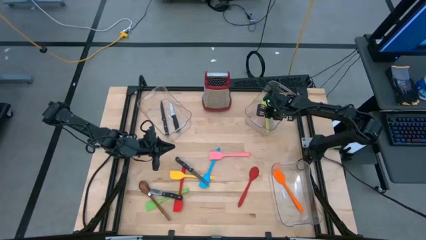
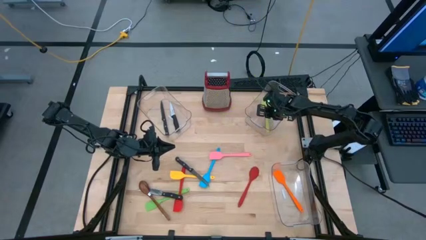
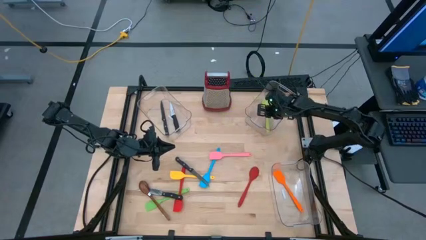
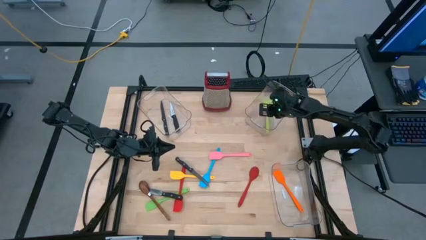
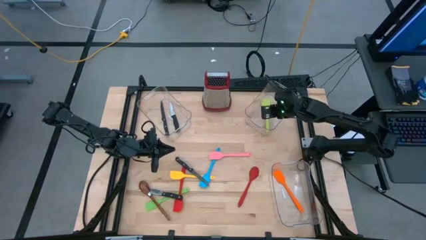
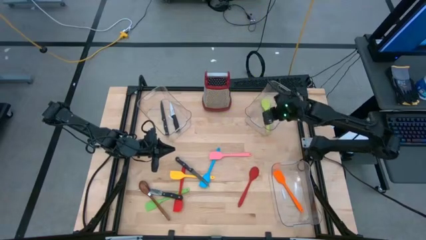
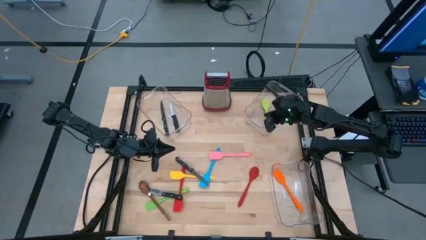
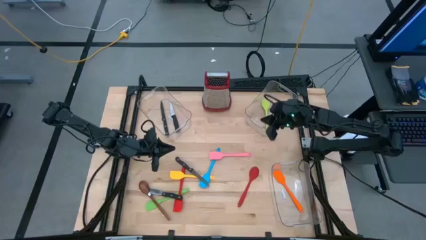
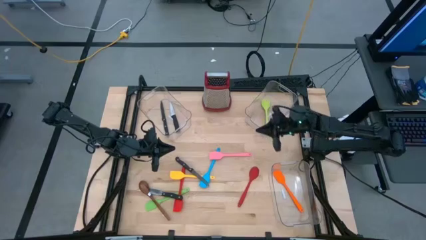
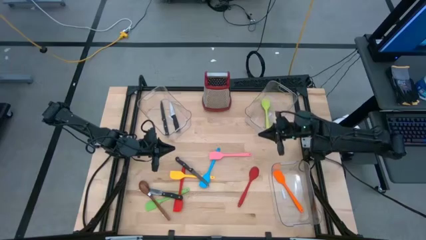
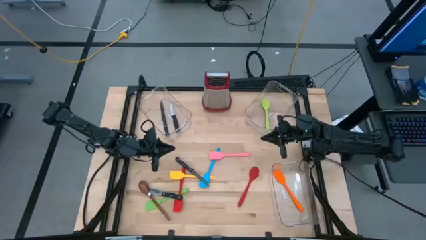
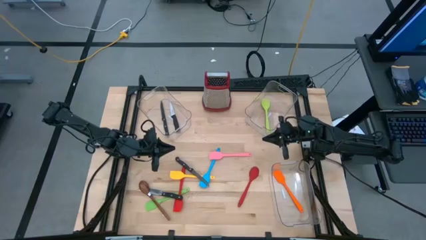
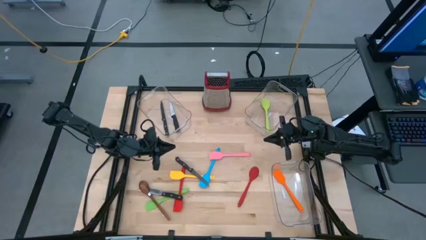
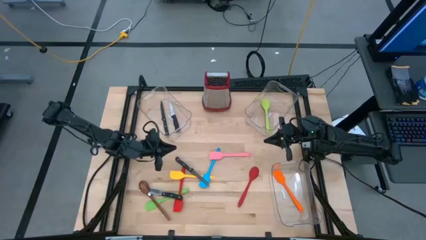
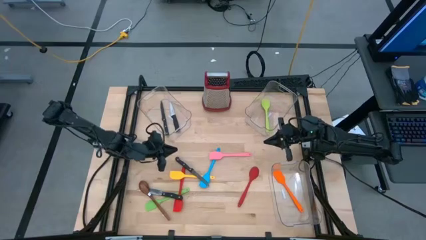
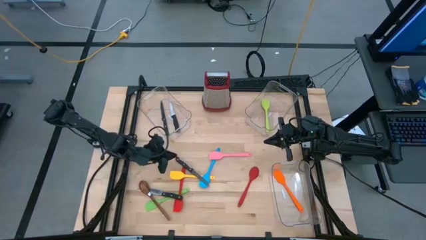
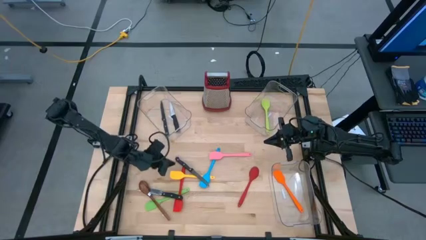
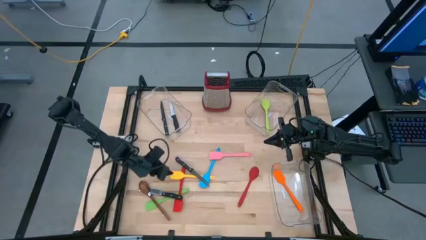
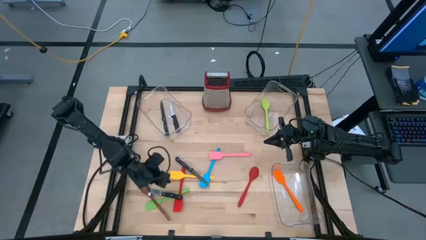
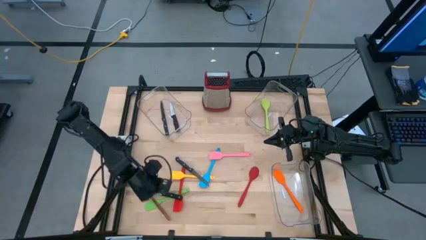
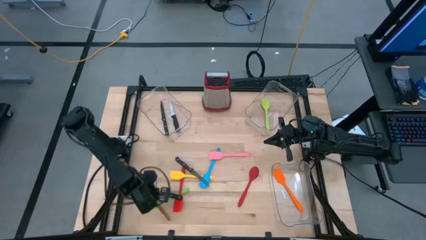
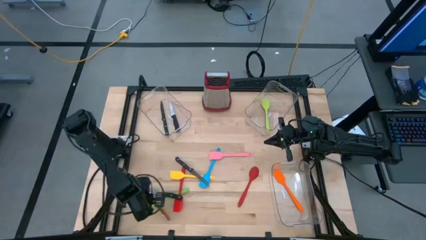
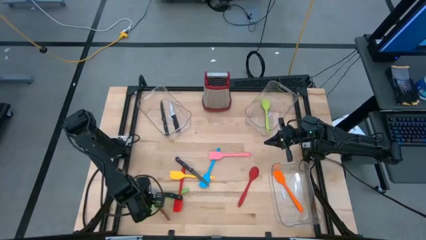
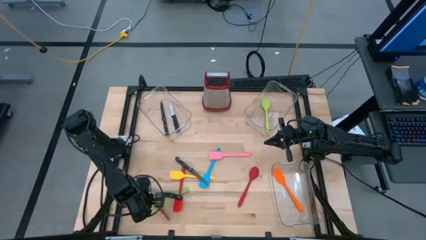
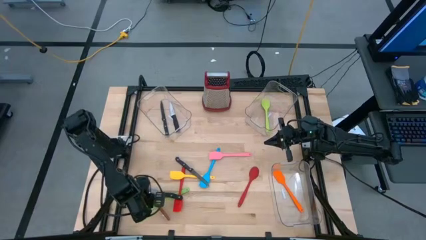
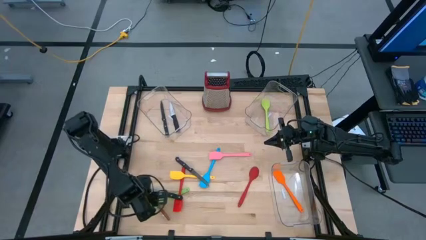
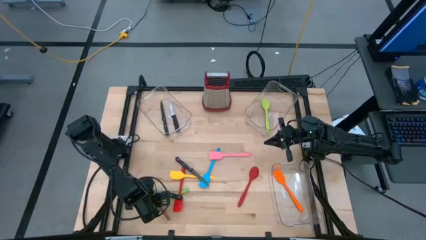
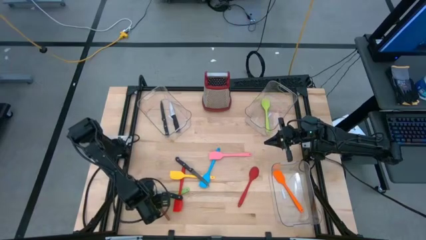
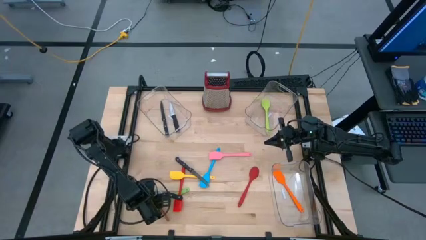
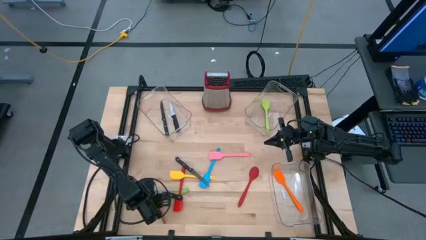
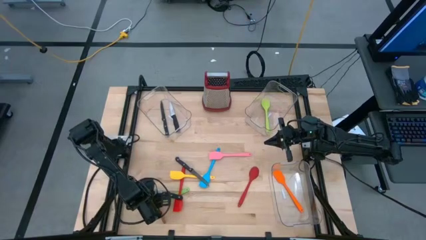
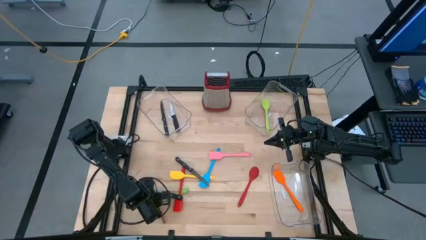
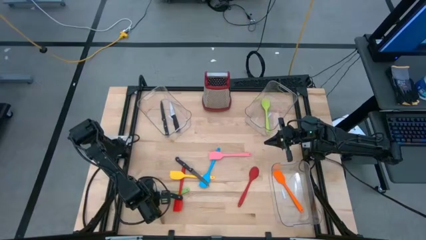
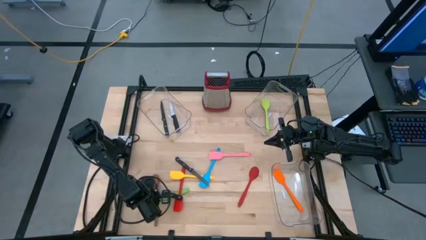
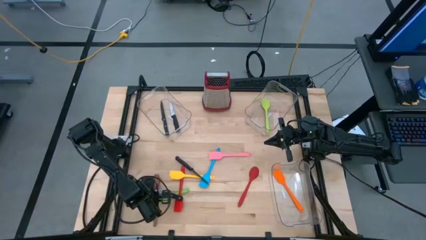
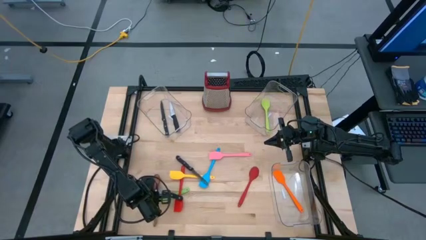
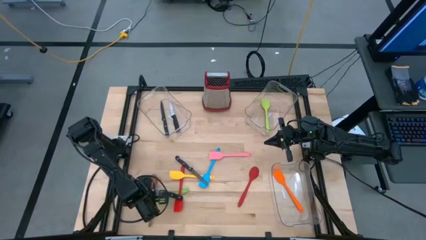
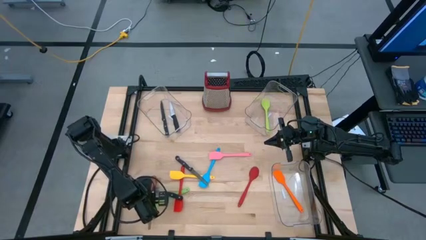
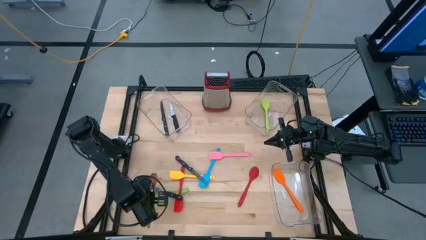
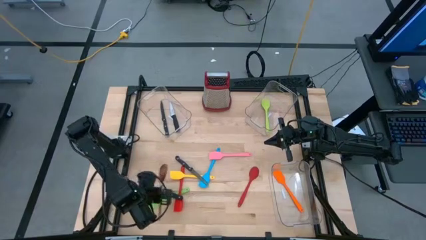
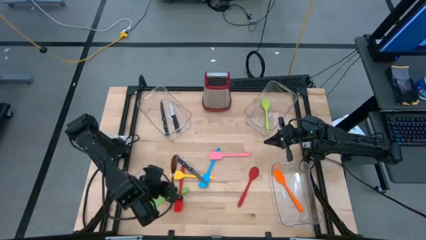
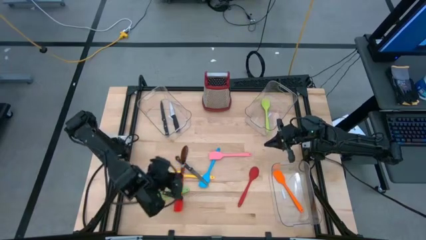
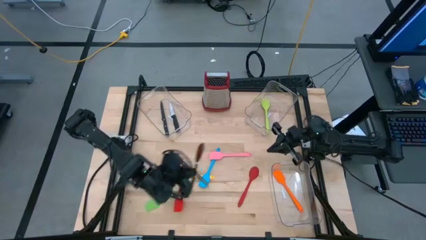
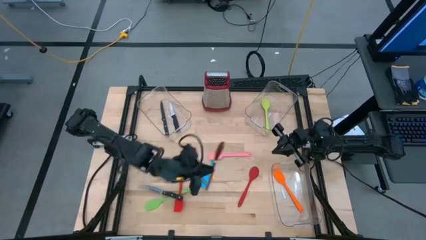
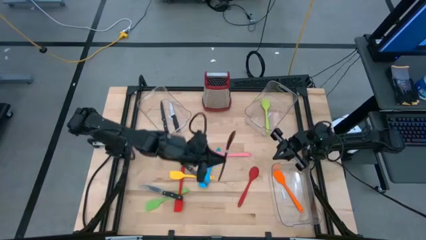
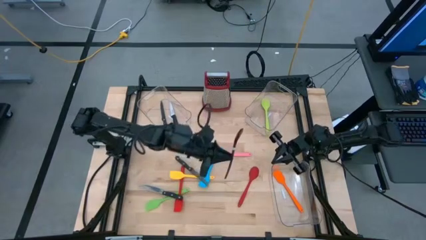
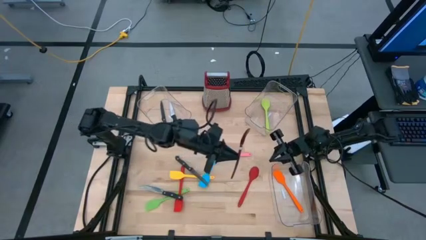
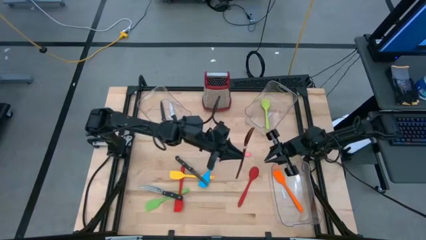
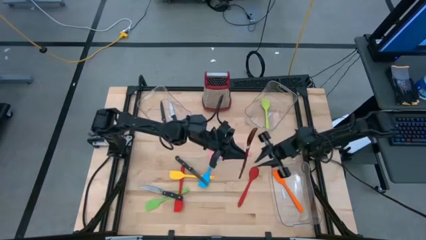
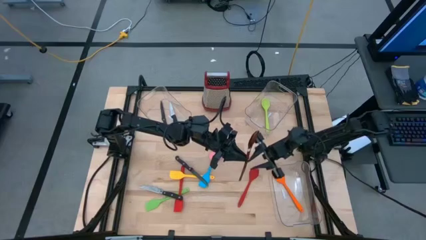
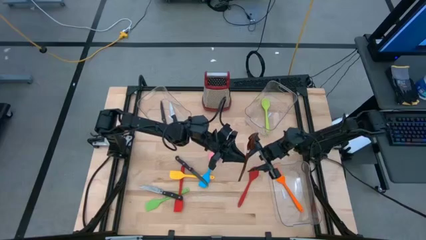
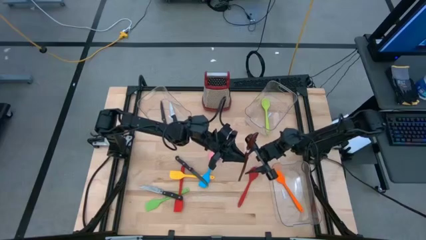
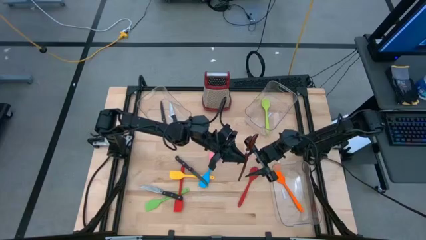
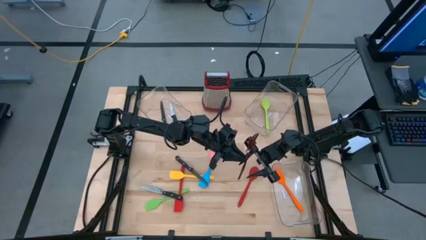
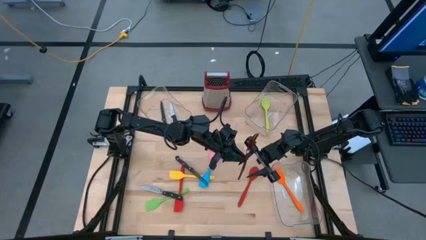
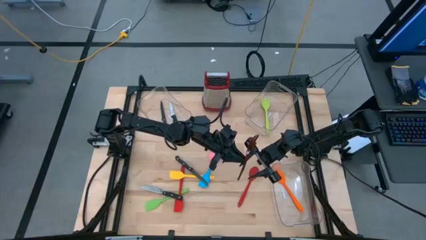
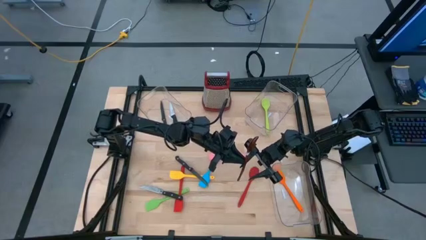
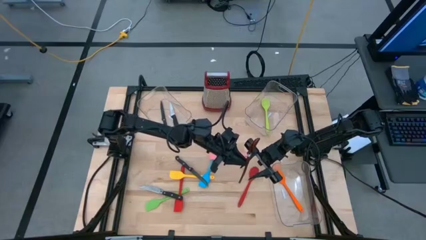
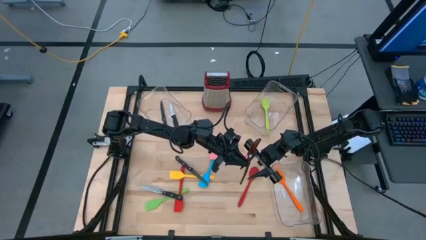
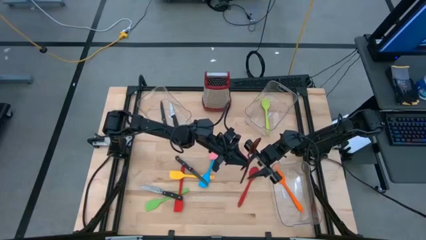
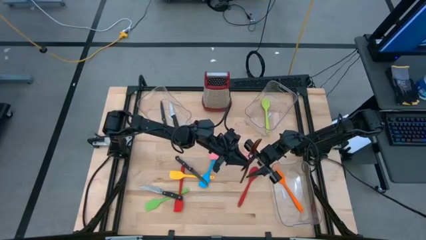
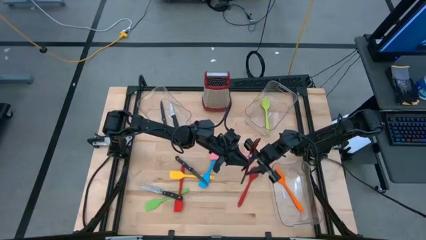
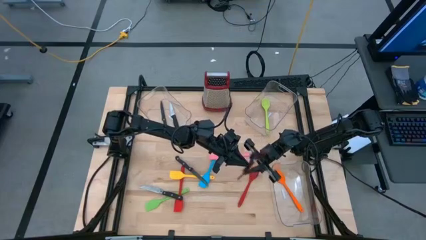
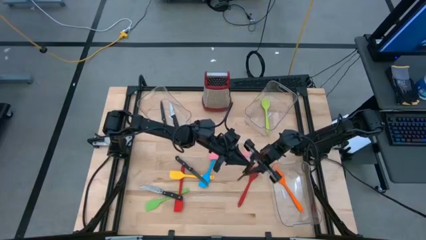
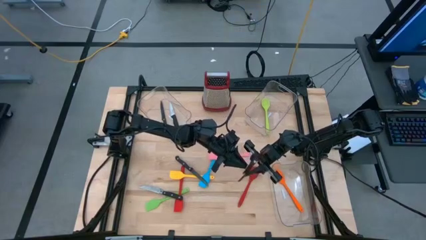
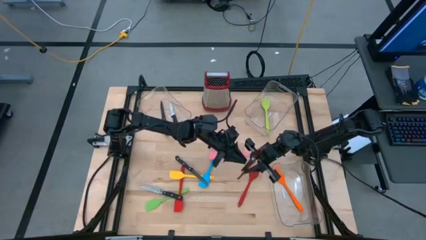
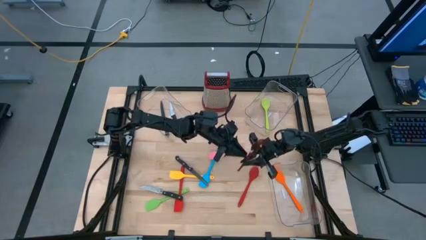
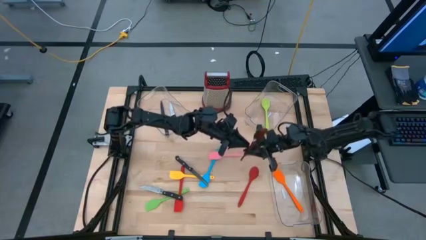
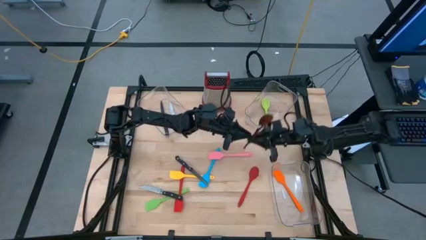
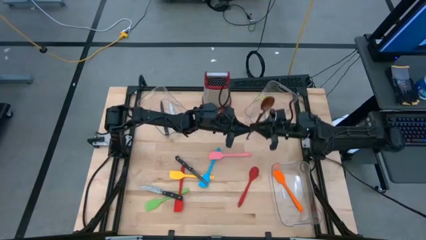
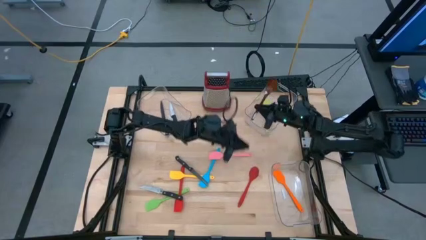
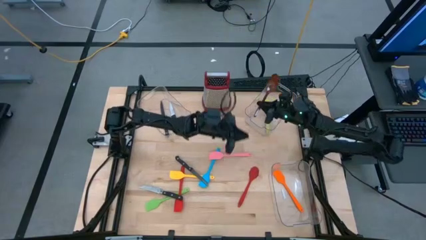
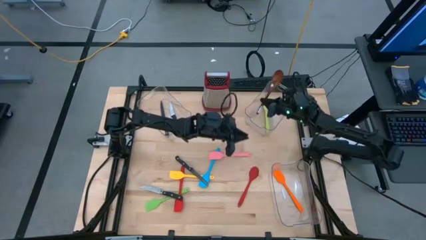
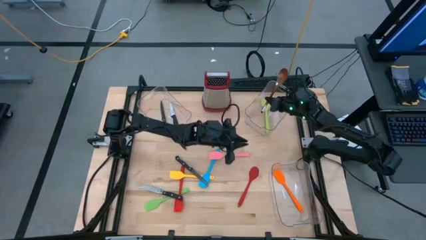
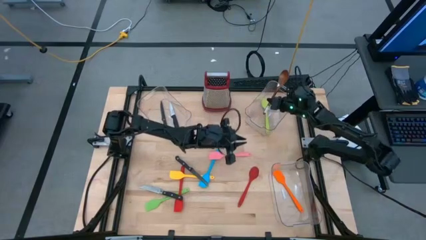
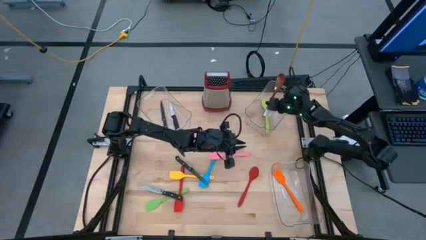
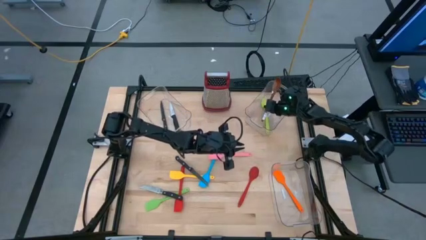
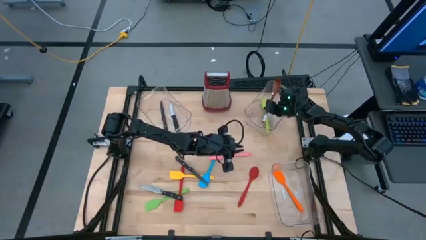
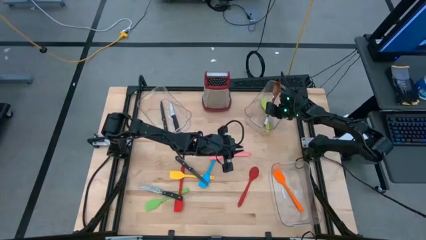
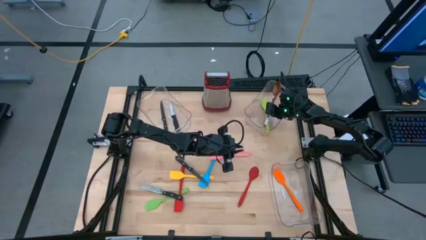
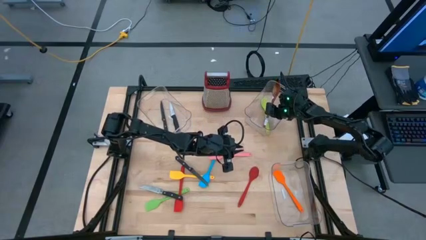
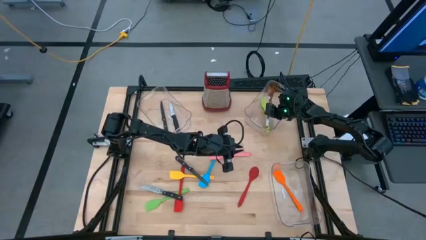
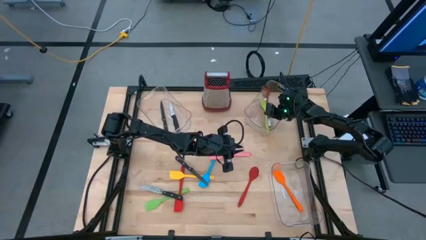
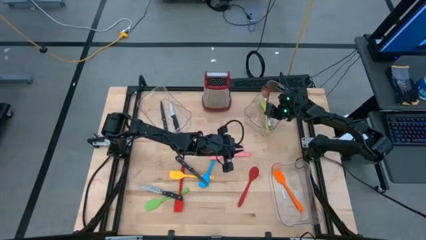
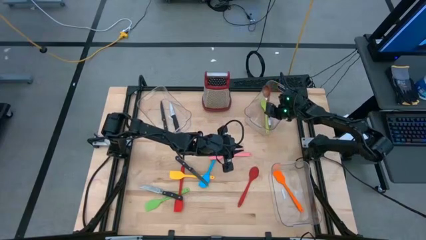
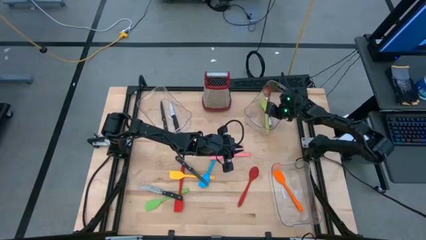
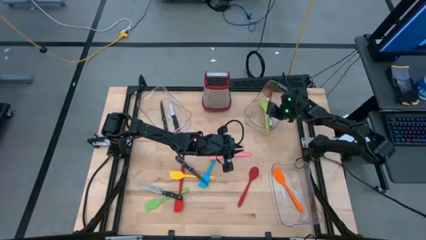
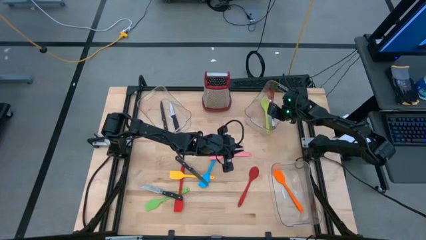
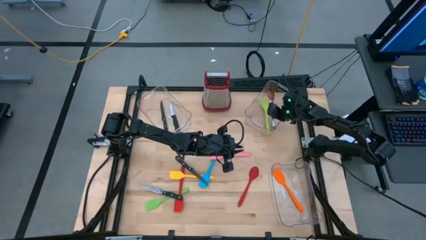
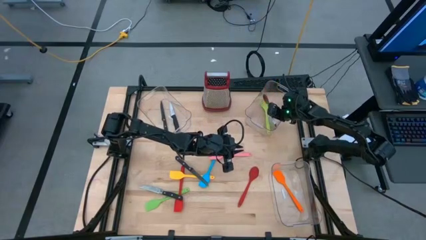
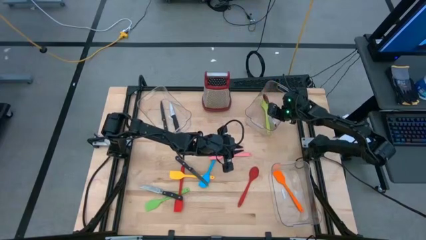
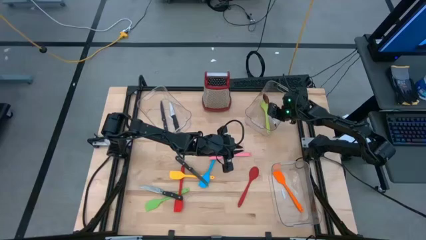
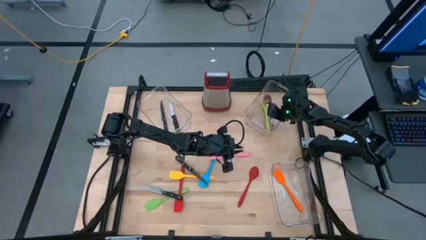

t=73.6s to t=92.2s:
Task: Pick & Place Kitchen Items
Put the brown serving spoon into the top right transparent bin
